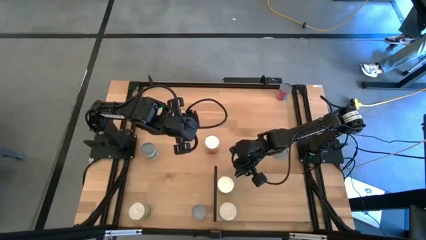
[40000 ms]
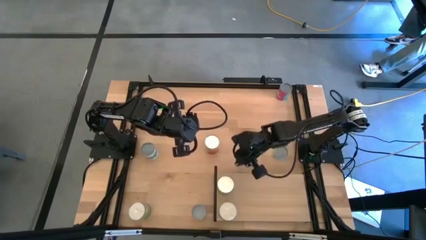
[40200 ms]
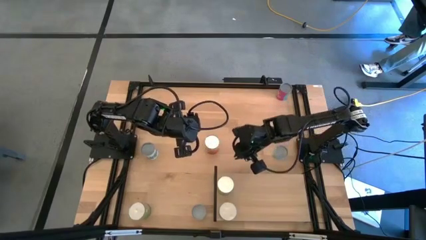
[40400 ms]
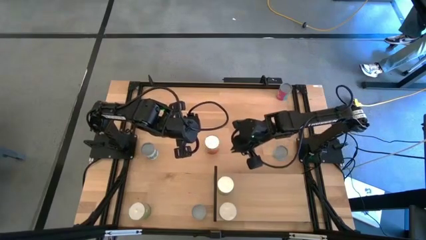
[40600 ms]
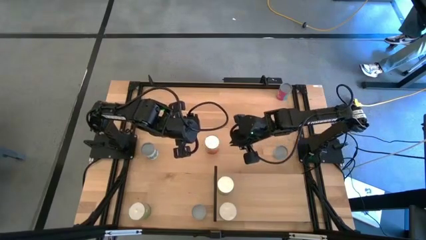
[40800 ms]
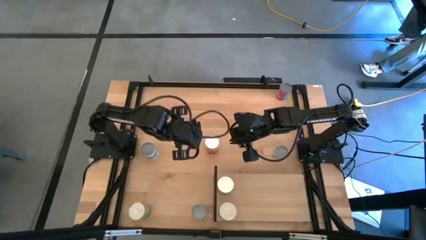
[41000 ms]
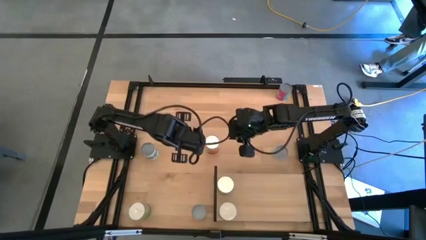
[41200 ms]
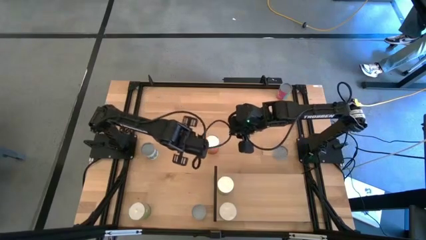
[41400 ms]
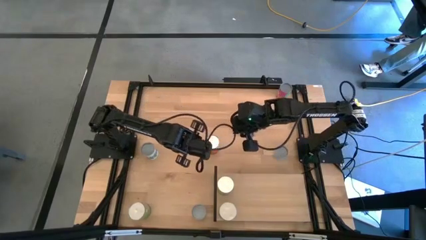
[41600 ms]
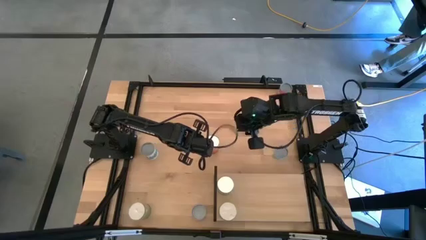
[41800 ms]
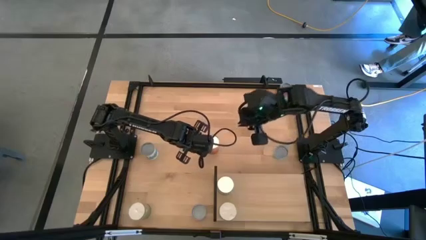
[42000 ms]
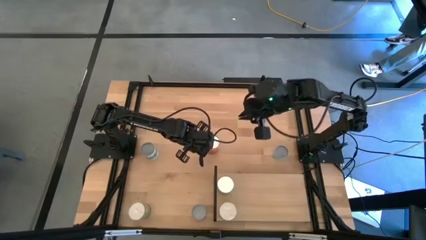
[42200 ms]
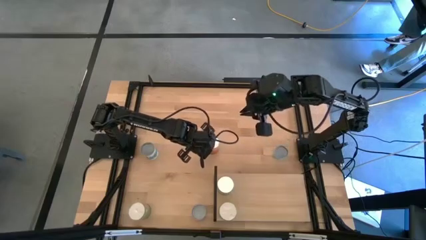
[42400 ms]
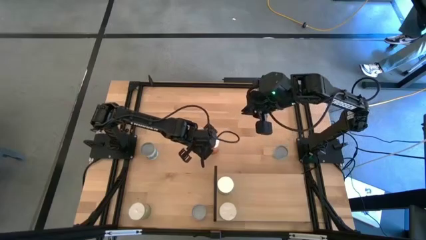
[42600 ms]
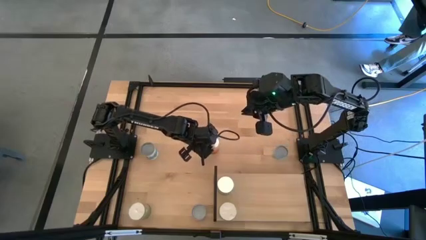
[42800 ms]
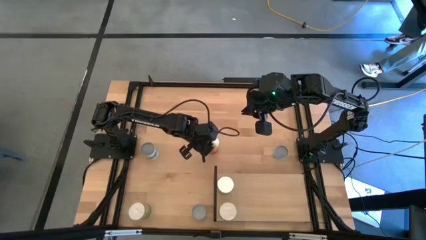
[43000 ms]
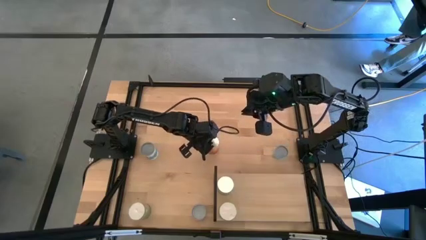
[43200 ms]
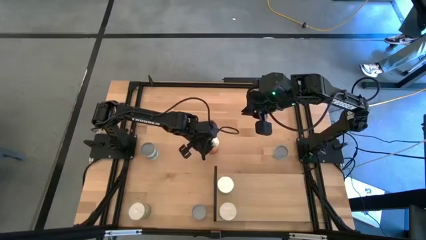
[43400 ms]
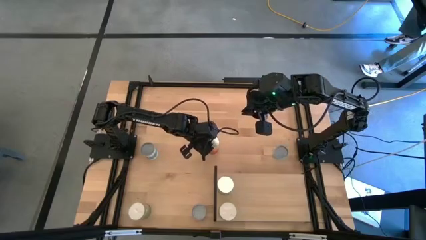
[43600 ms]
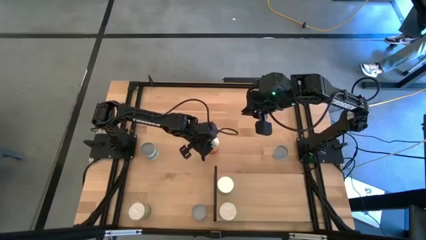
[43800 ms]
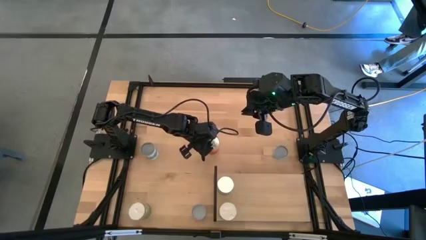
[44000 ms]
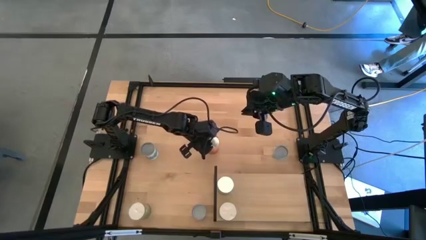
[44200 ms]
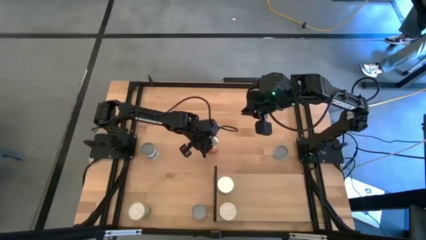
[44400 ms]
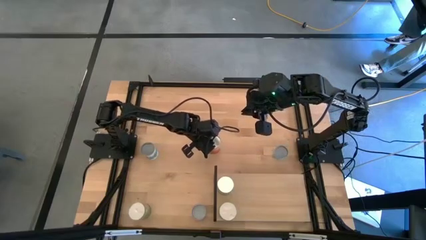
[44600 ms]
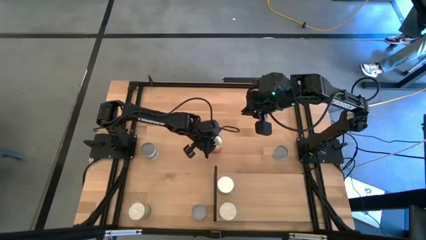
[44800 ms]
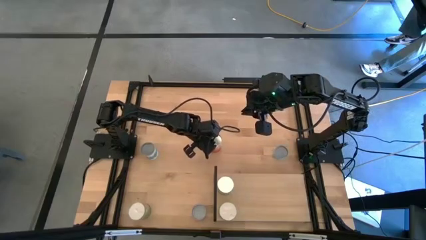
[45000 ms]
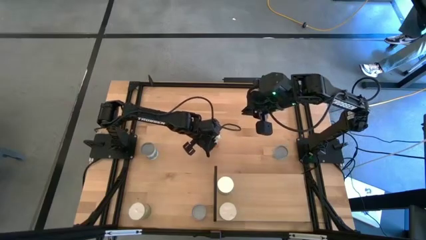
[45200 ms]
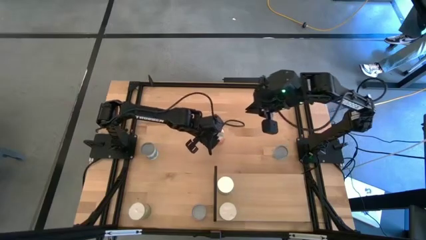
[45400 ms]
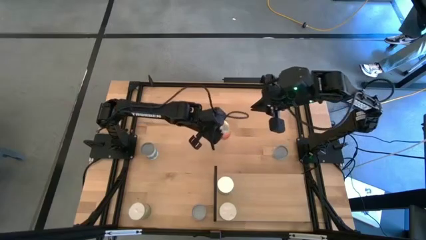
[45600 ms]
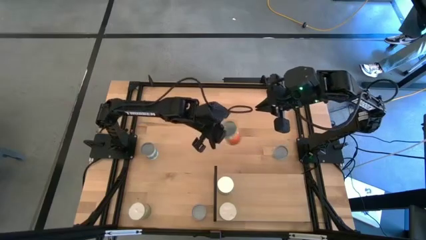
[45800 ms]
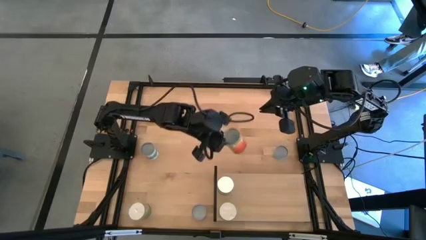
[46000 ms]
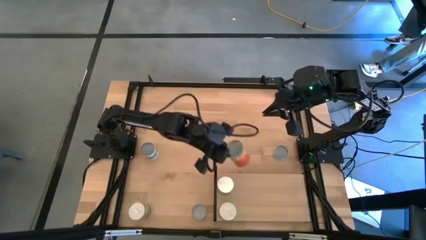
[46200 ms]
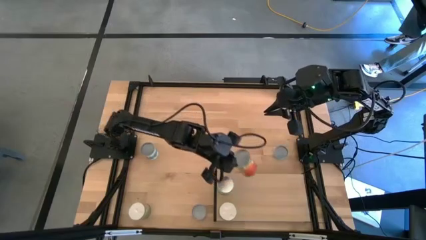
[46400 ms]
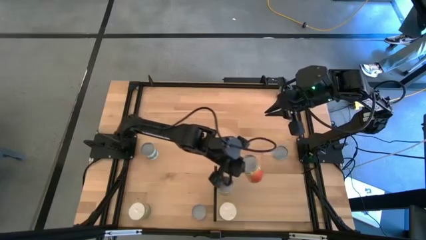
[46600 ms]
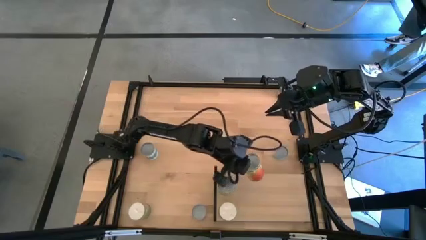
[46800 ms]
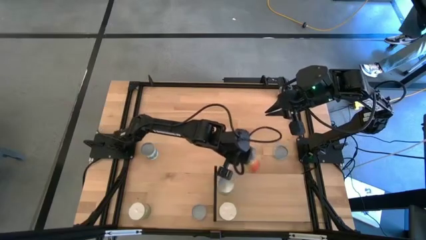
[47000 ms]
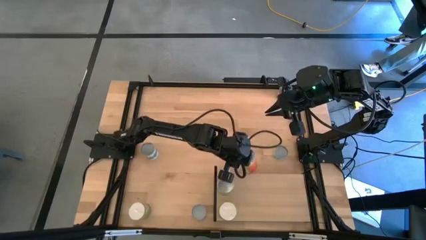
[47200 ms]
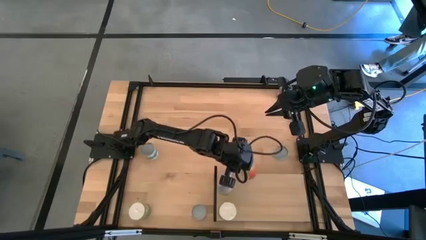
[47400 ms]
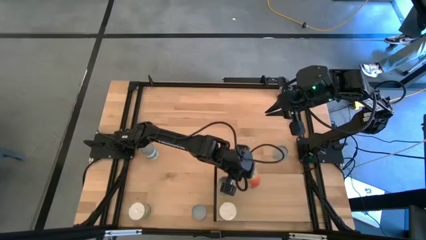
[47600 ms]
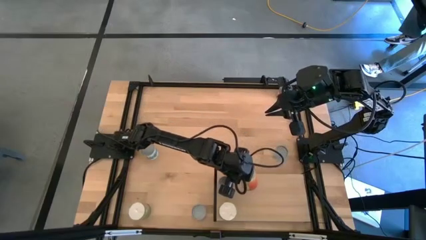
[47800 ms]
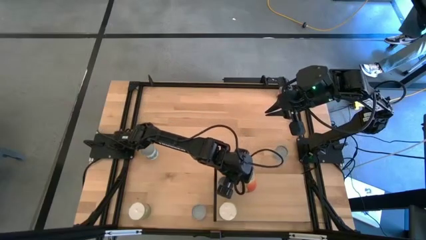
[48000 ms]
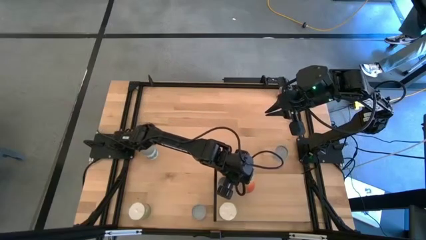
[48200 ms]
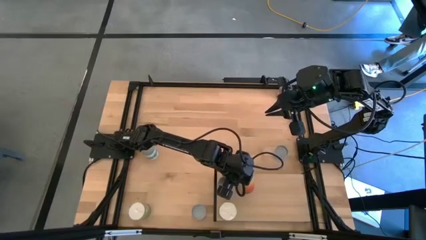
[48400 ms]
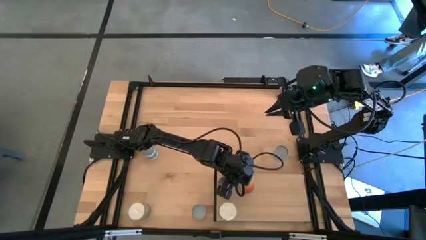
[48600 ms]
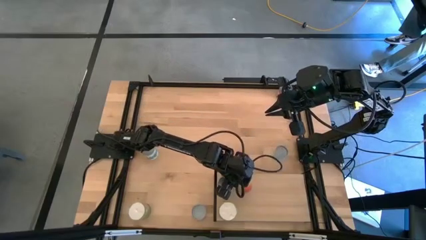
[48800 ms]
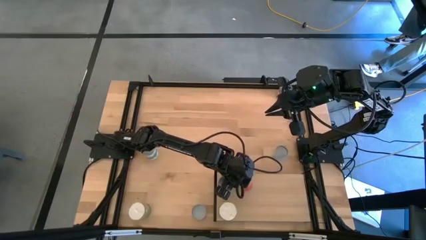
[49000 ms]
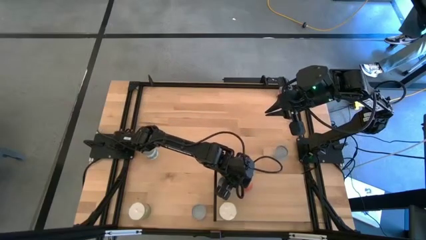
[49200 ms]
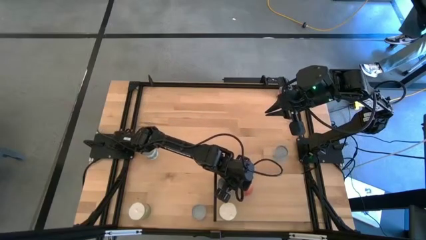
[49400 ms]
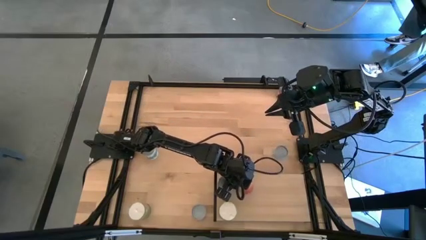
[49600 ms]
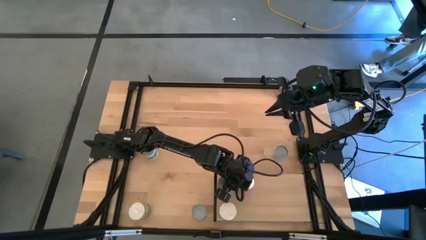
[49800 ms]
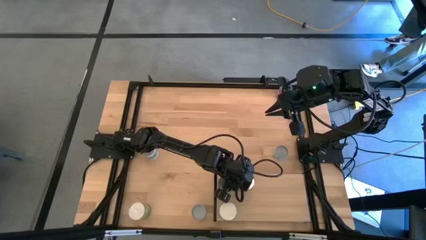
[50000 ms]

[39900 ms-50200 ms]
Task: Pick and place cans onto a shelf
Put the canned pineapple on the shelf

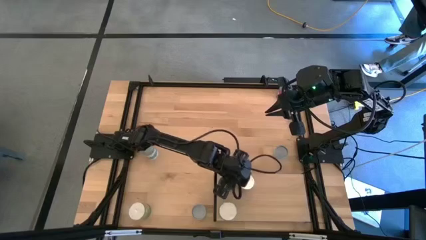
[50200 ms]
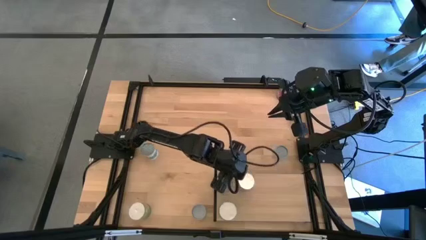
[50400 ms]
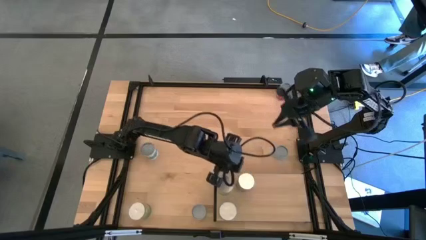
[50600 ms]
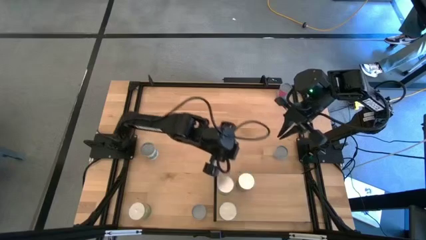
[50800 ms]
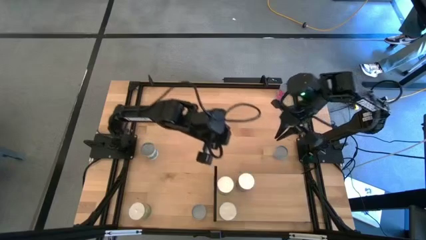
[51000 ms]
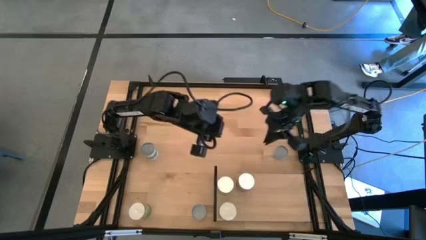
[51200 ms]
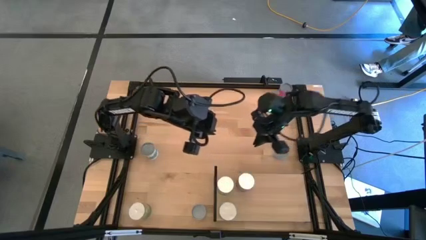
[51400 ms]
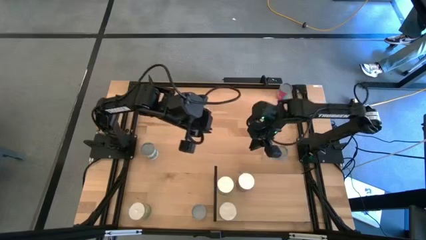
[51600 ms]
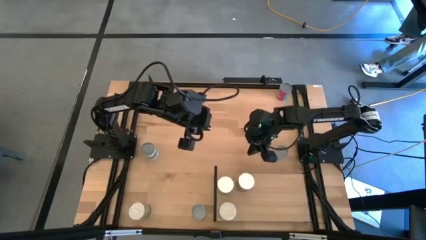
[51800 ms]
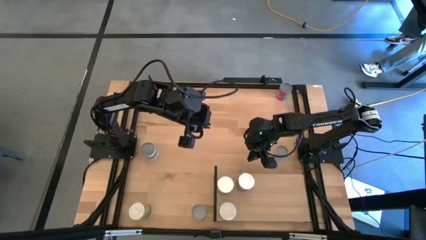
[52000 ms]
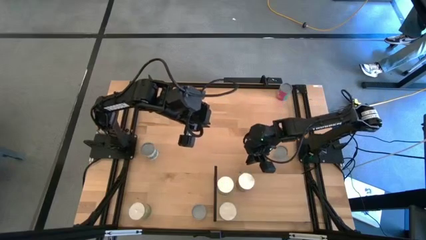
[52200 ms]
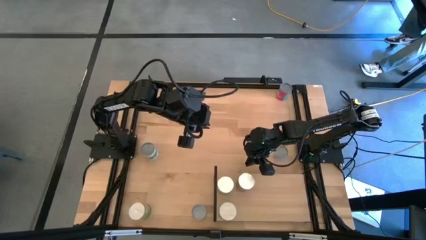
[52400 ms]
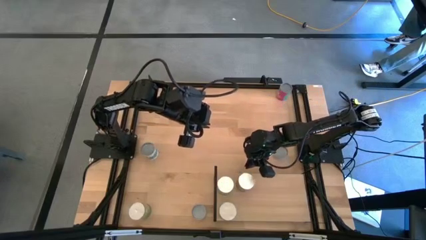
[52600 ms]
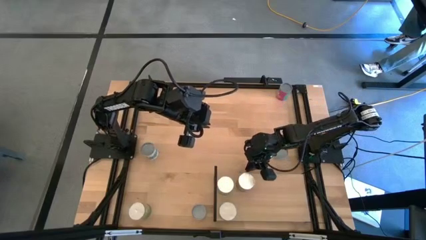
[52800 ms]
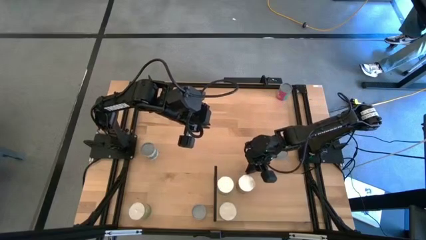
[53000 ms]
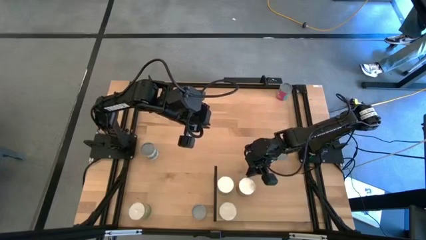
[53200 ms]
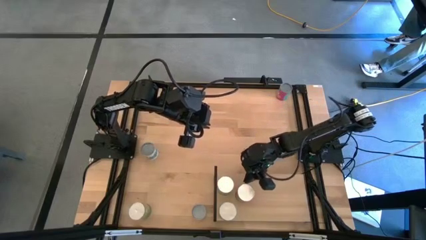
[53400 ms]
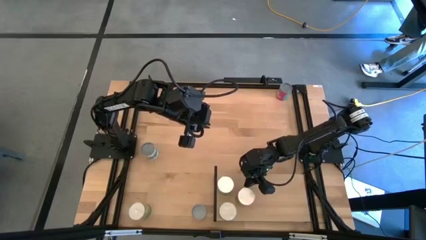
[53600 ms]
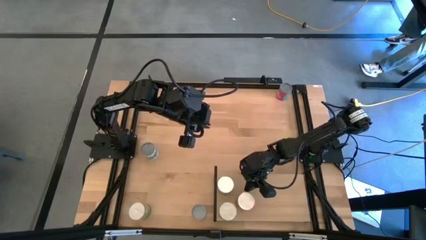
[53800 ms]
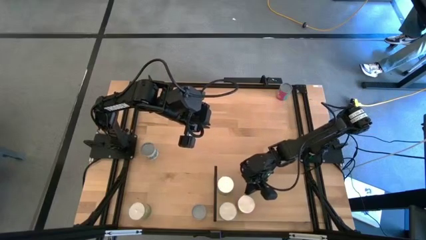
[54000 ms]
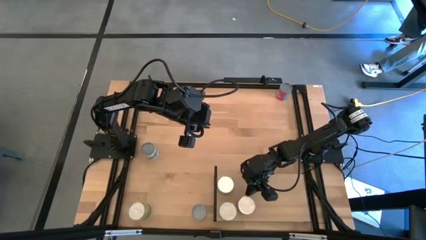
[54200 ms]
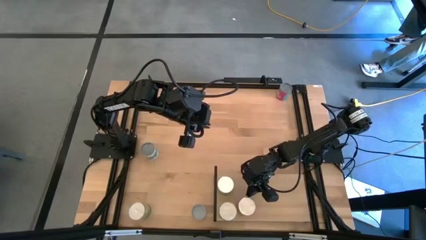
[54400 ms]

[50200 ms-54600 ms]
Adjust the canned pineapple on the shelf
